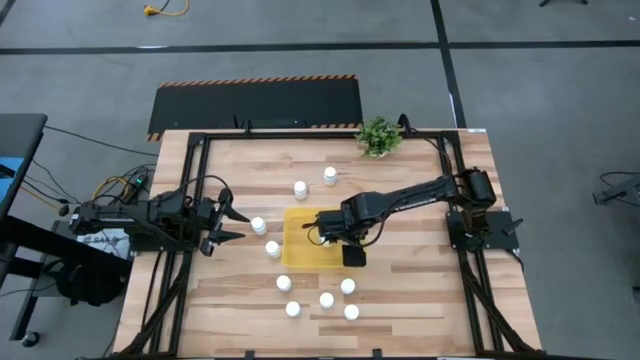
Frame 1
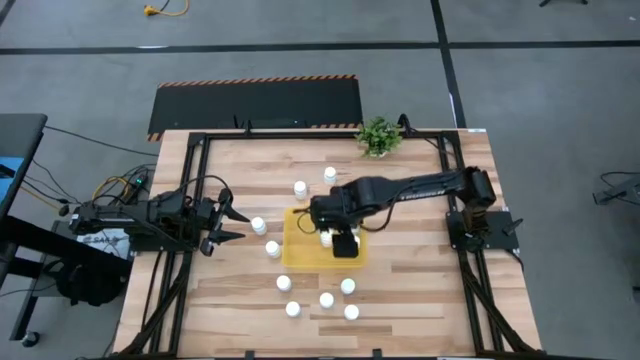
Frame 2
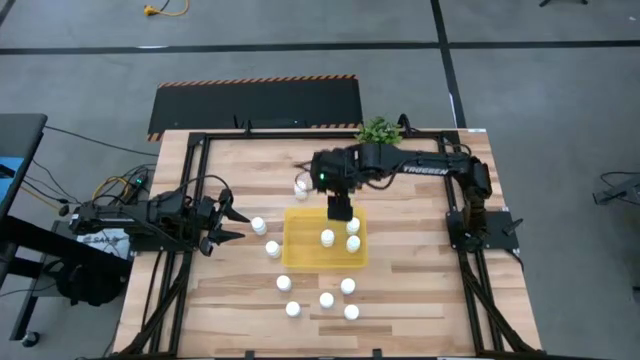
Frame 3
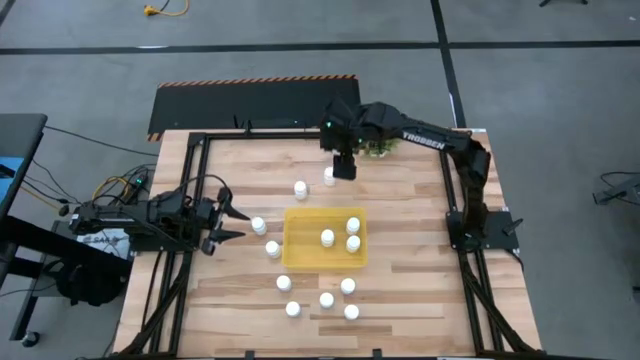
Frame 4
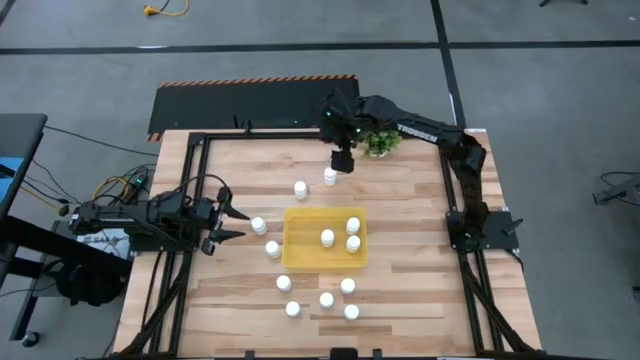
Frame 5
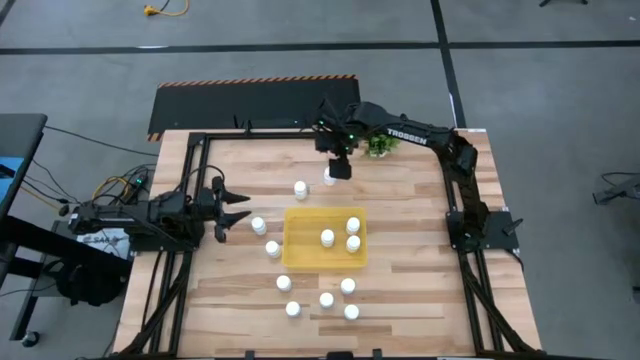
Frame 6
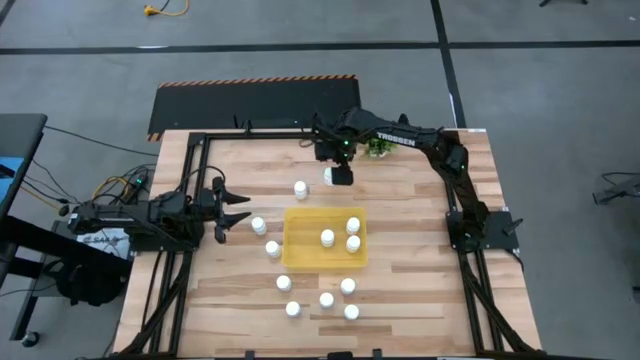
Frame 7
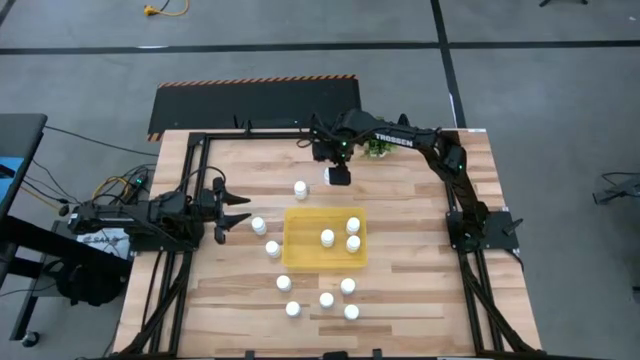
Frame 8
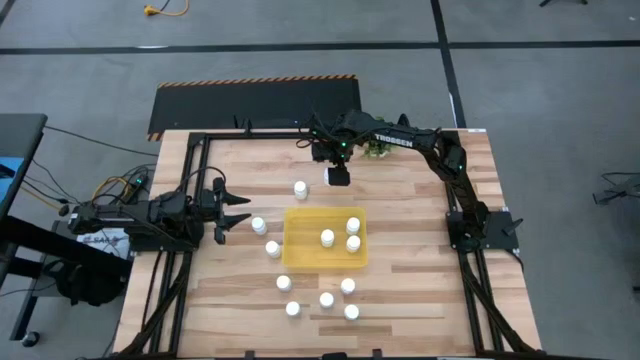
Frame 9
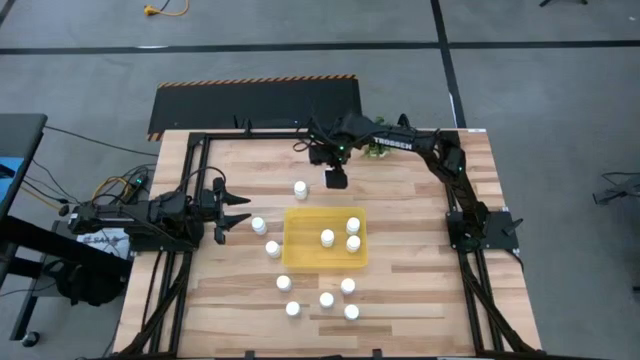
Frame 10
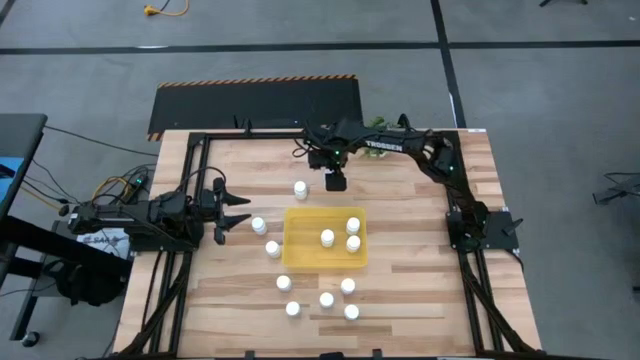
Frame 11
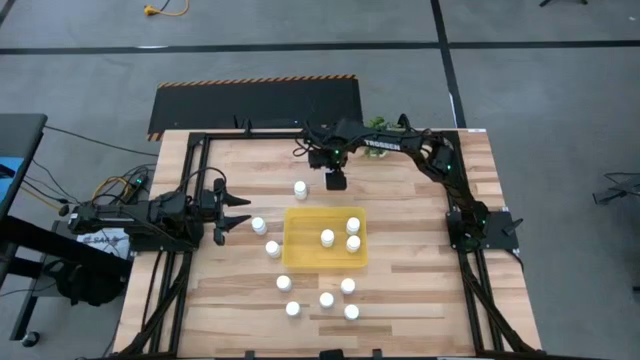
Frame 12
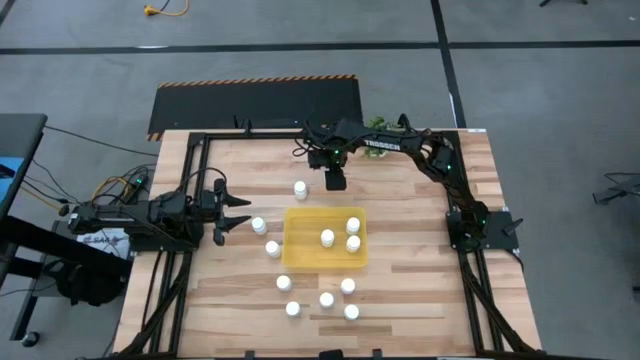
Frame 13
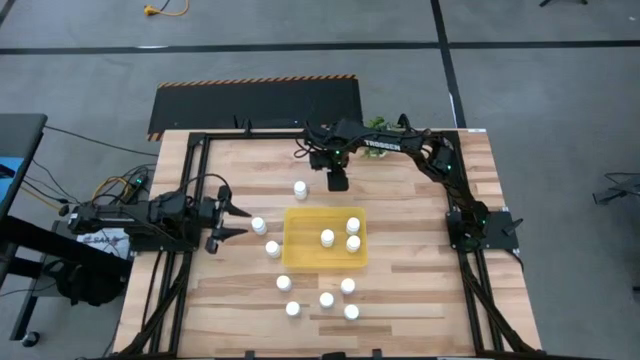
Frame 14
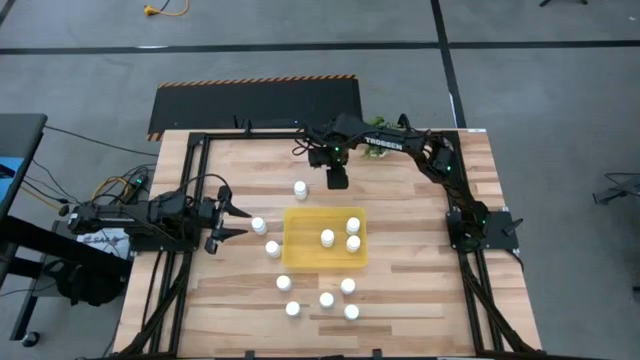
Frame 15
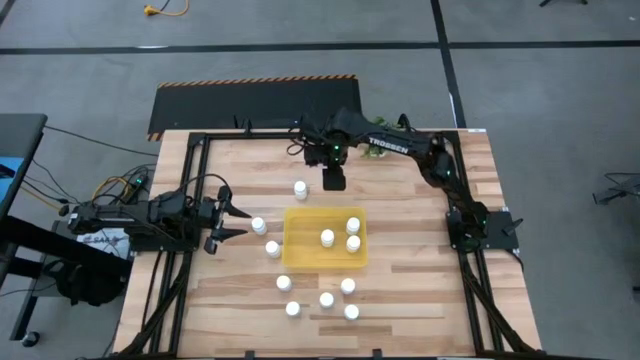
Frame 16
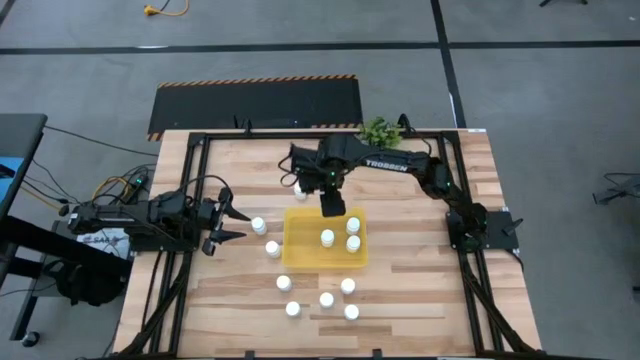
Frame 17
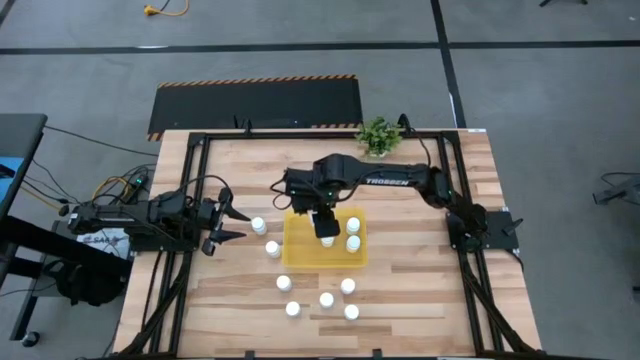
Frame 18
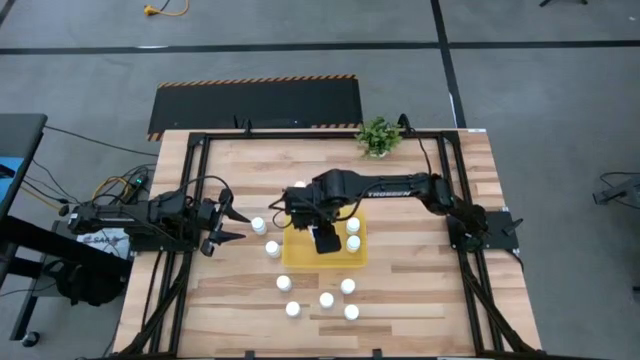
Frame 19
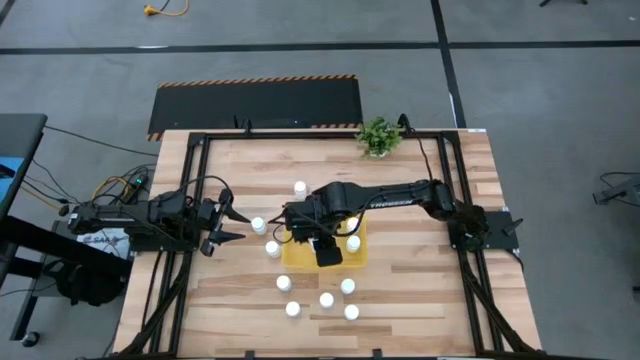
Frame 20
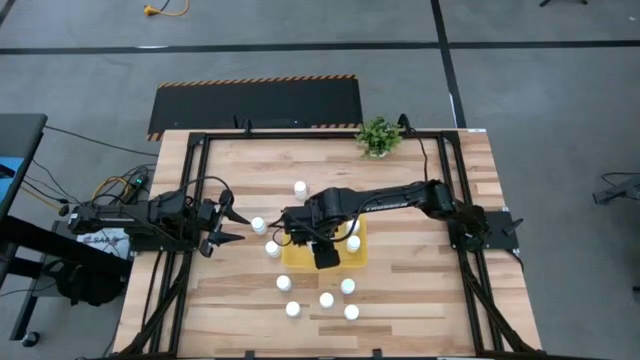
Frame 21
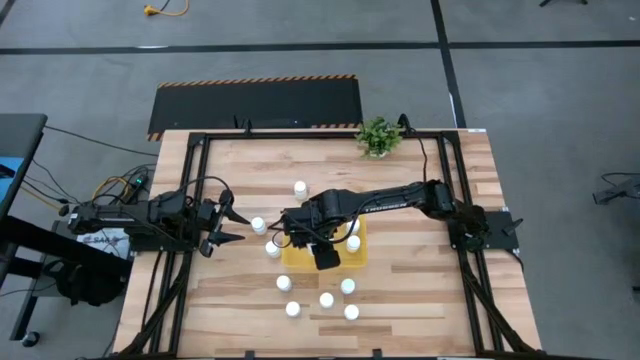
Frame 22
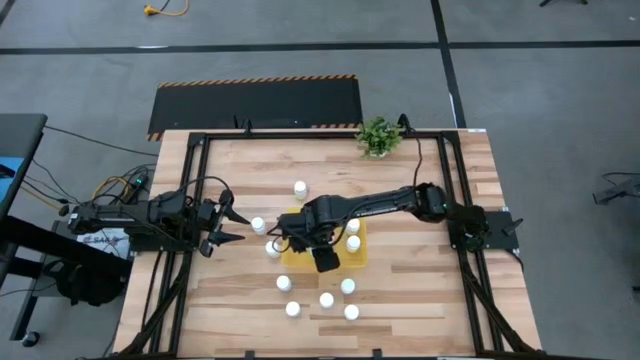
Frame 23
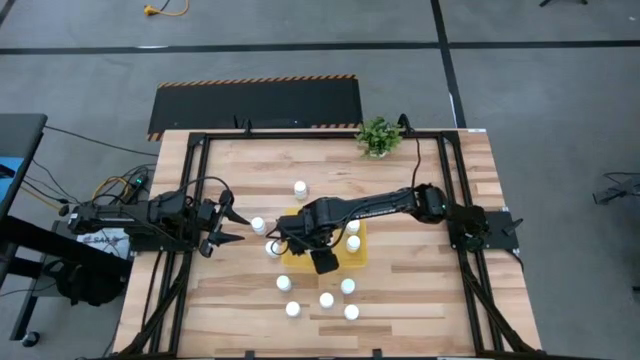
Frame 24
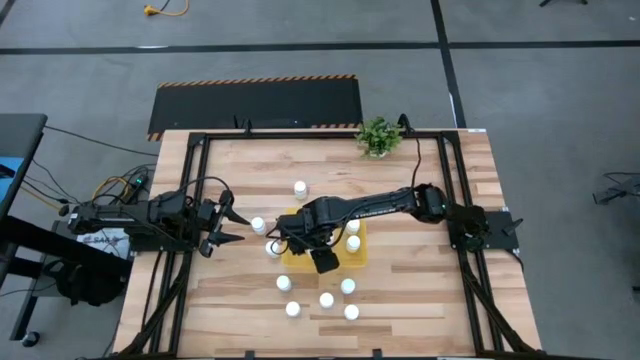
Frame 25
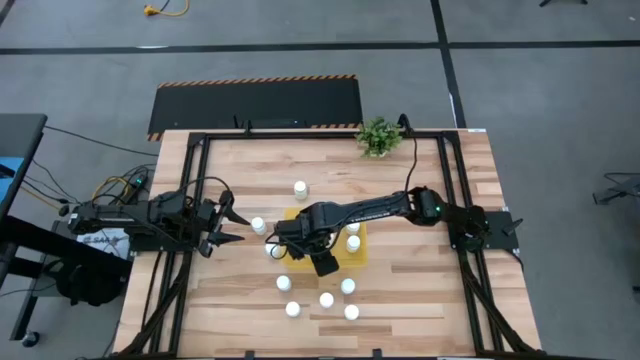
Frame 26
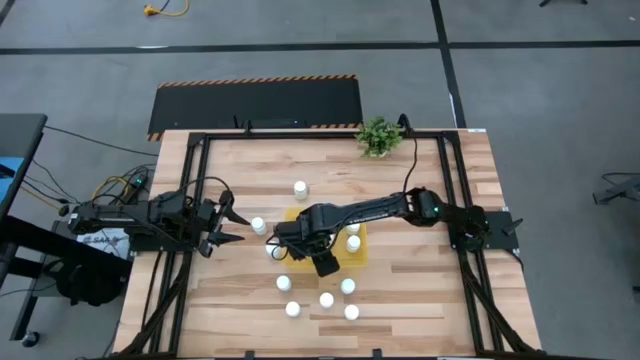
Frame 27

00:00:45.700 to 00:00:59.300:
Task: Pick and place pill bottles into a basket
Put the white pill bottle into the yellow bin

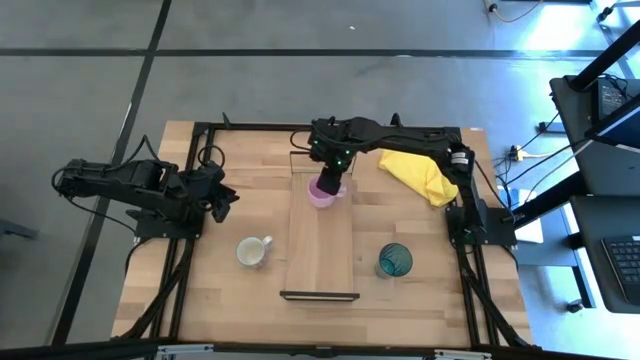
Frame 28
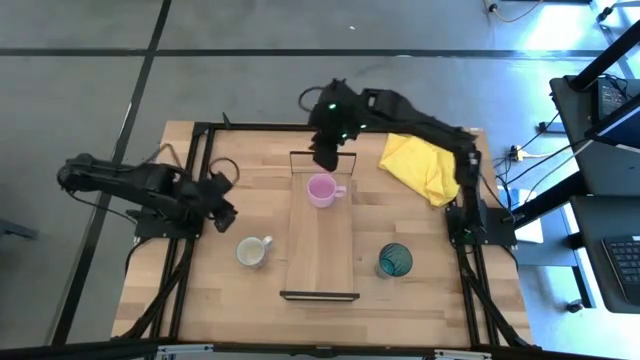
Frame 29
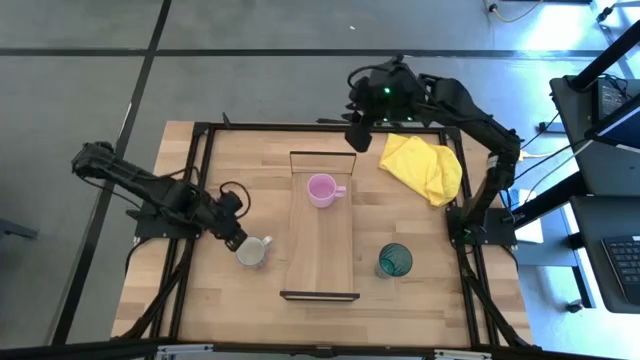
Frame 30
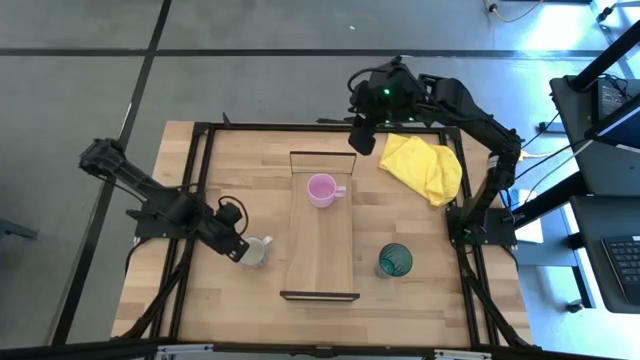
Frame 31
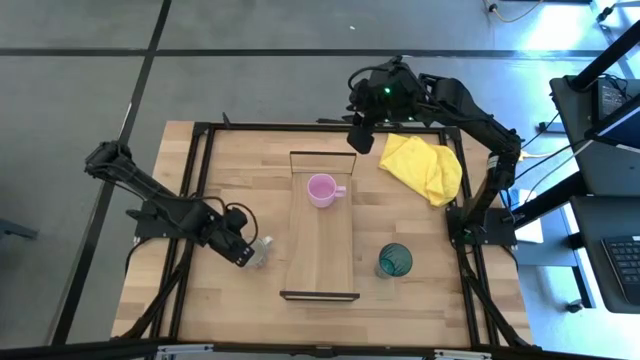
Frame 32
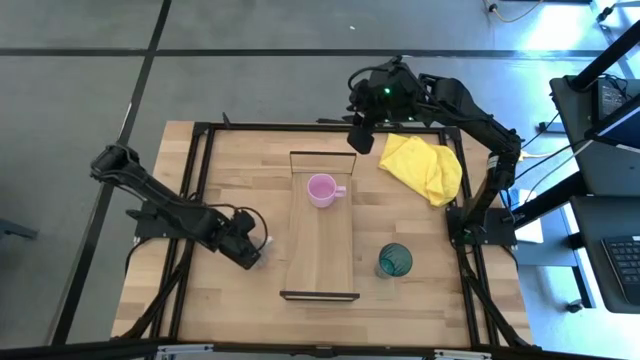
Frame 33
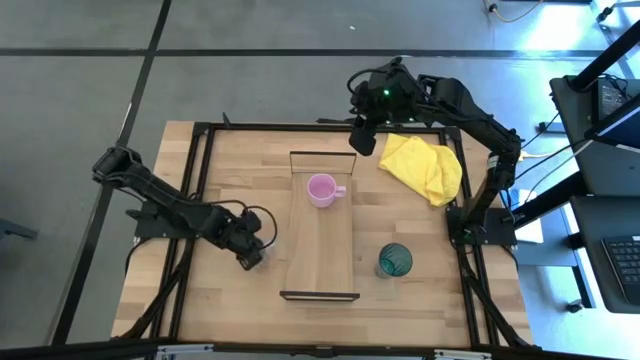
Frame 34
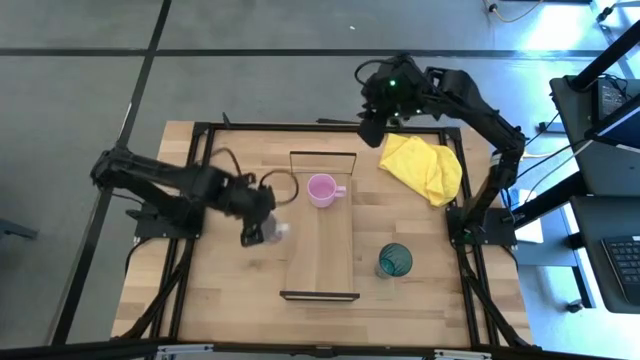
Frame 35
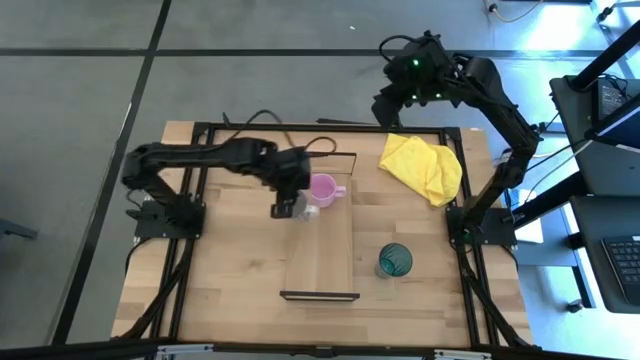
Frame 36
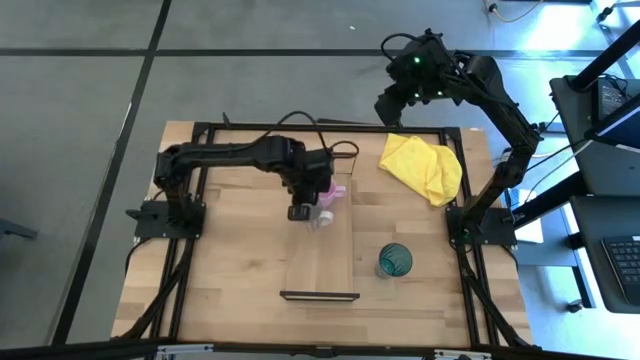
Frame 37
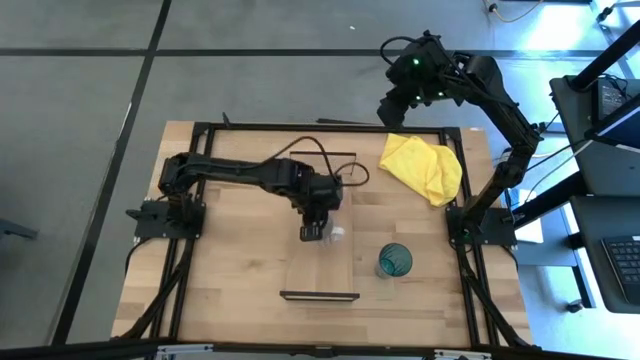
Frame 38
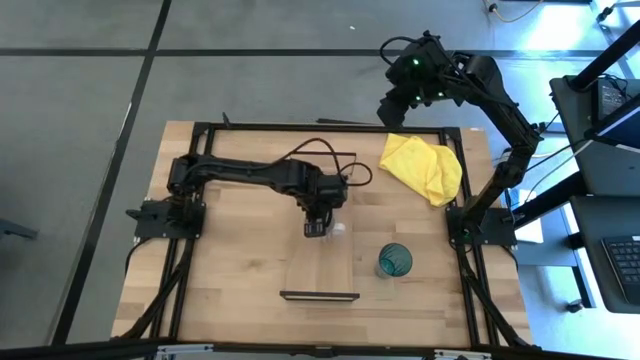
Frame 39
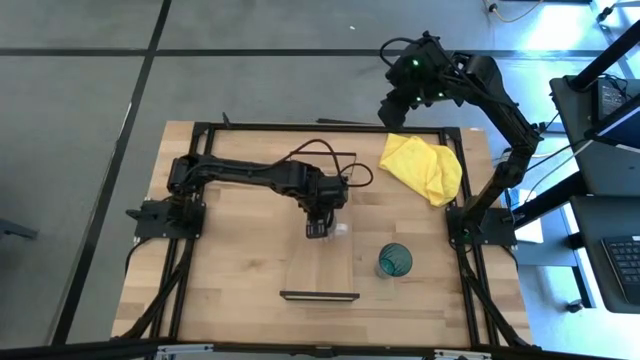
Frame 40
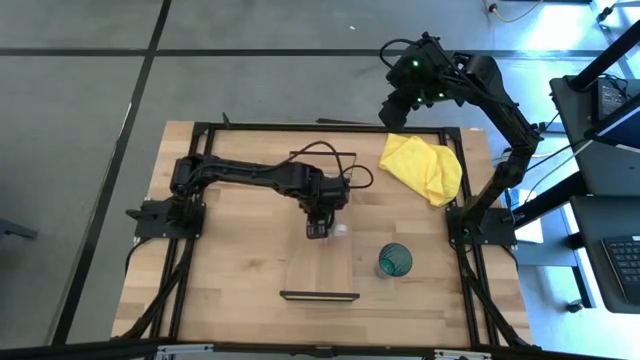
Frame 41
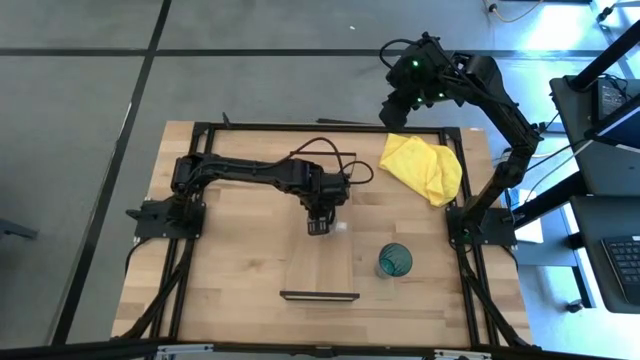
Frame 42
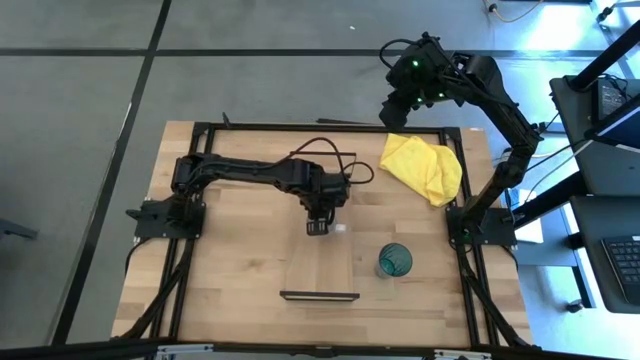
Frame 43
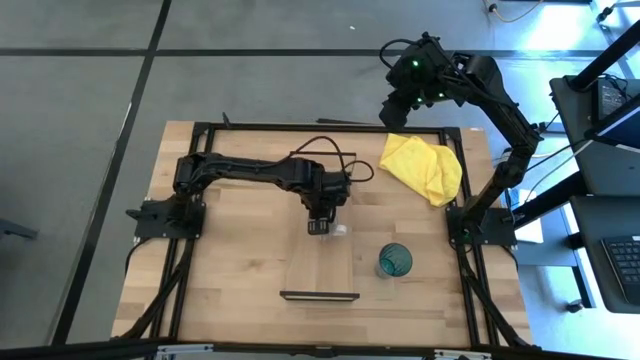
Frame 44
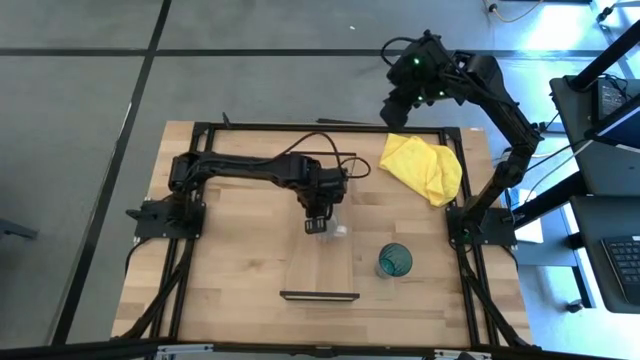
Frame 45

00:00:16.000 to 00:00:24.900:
Task: Stack small to large cups/mugs on shelf
Put the white patterned mug on the shelf
